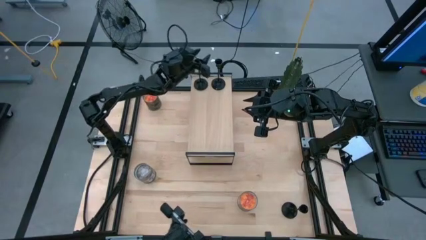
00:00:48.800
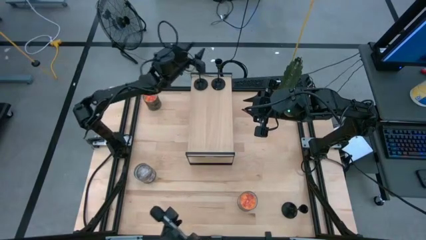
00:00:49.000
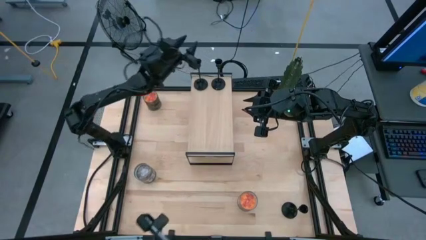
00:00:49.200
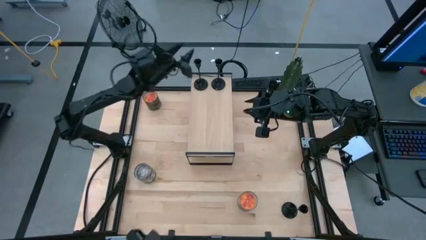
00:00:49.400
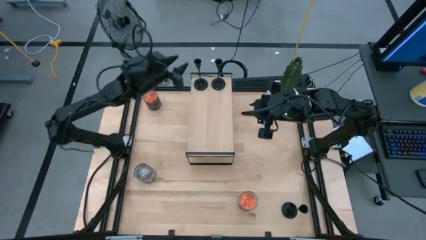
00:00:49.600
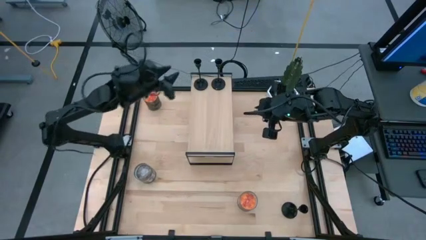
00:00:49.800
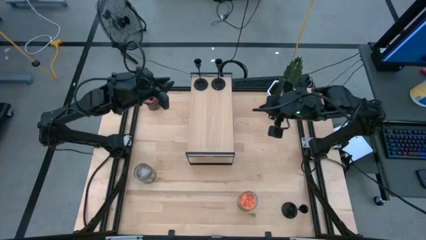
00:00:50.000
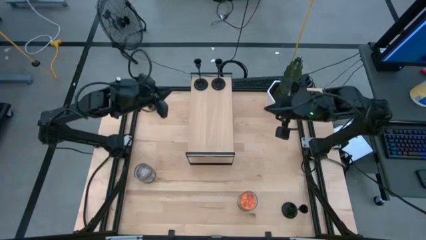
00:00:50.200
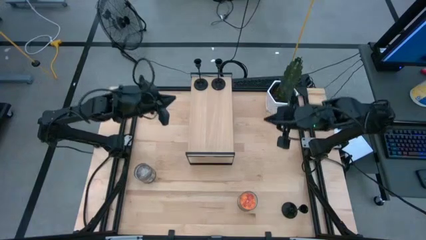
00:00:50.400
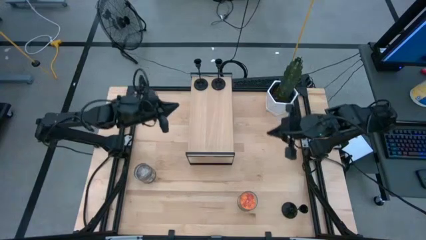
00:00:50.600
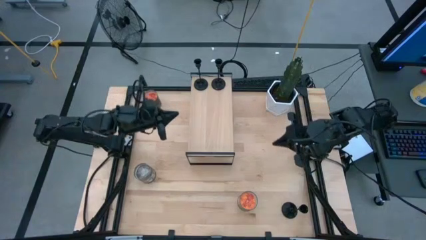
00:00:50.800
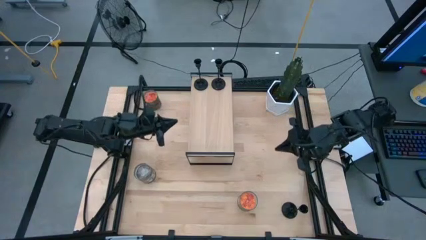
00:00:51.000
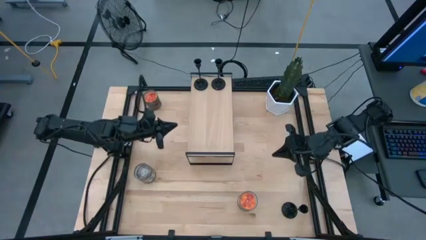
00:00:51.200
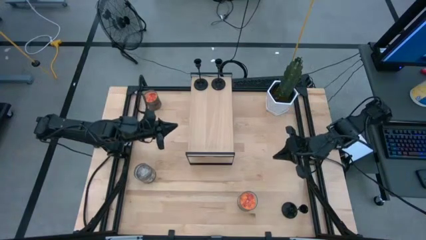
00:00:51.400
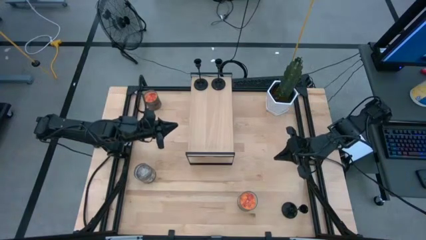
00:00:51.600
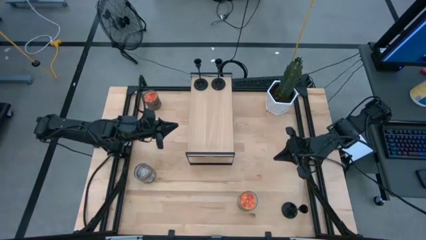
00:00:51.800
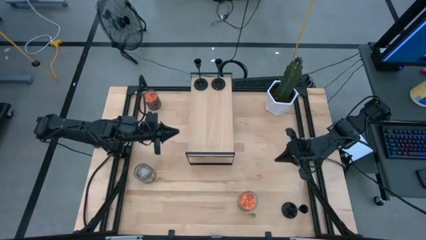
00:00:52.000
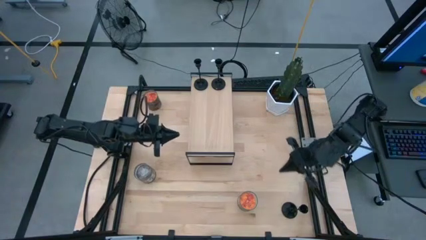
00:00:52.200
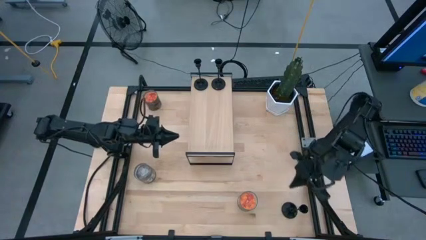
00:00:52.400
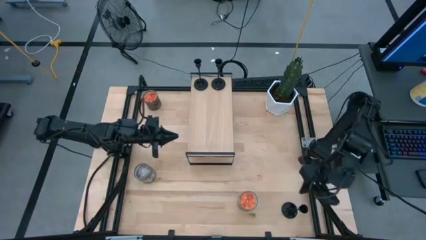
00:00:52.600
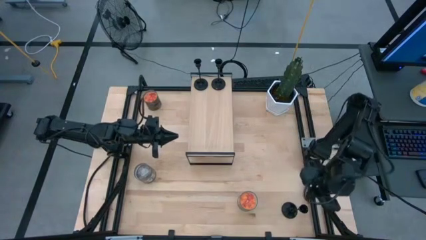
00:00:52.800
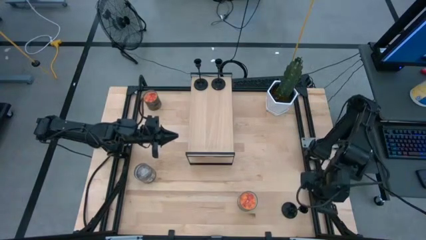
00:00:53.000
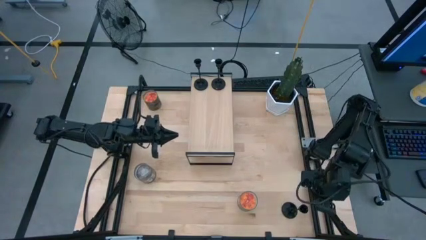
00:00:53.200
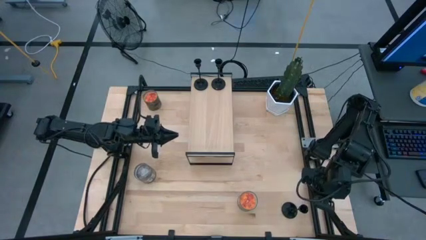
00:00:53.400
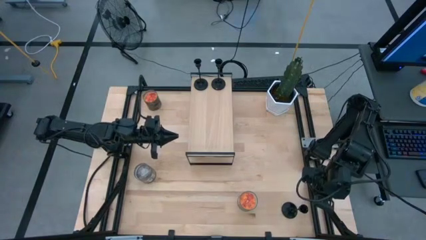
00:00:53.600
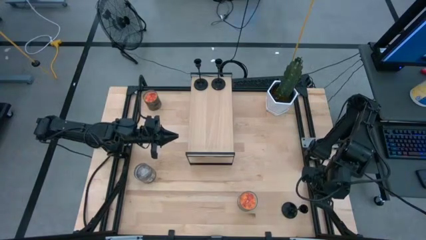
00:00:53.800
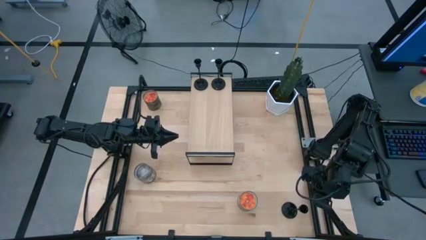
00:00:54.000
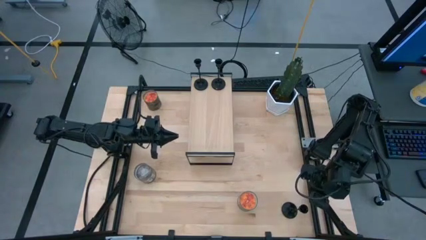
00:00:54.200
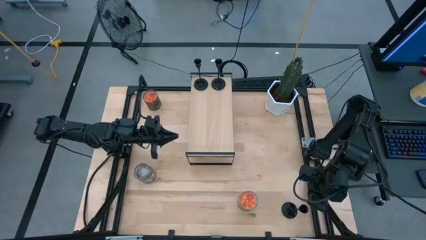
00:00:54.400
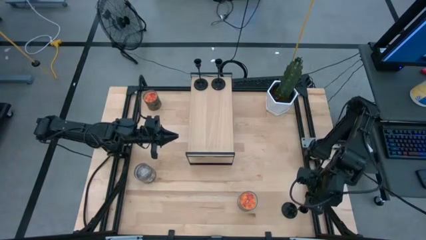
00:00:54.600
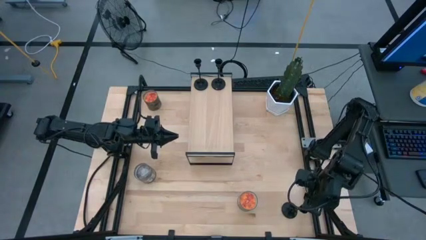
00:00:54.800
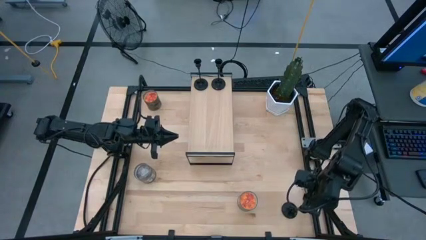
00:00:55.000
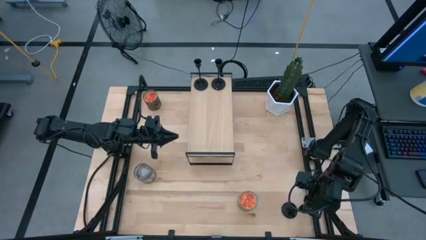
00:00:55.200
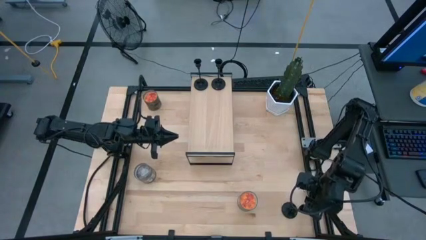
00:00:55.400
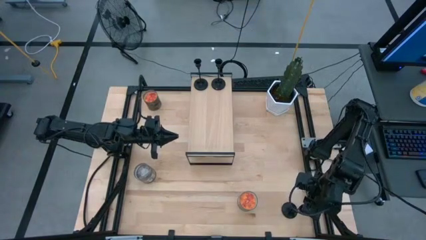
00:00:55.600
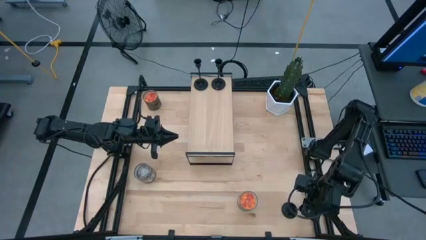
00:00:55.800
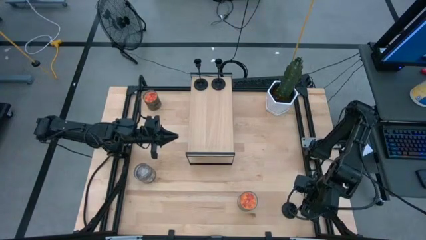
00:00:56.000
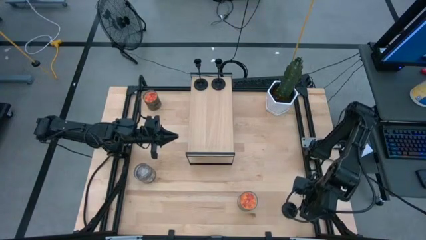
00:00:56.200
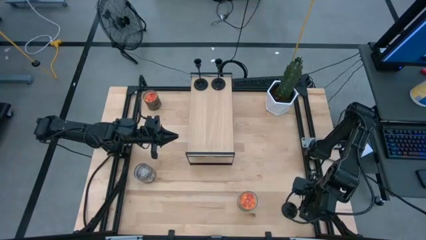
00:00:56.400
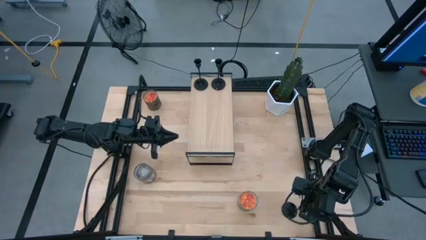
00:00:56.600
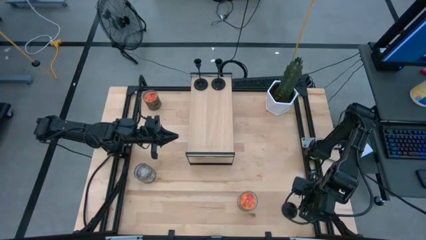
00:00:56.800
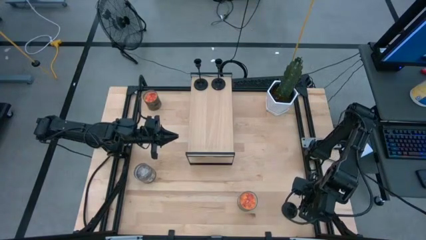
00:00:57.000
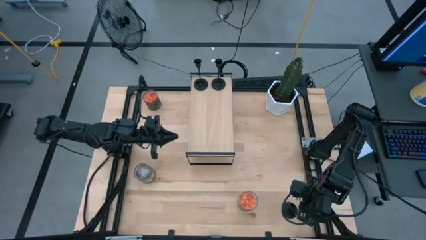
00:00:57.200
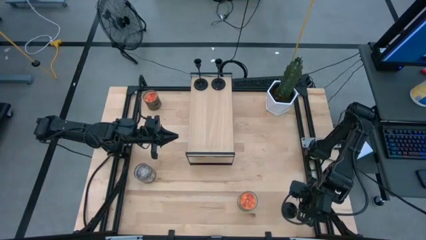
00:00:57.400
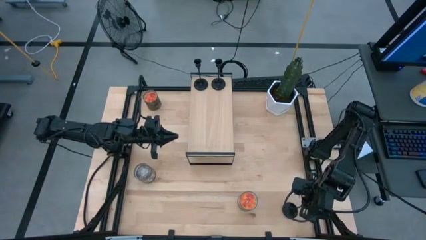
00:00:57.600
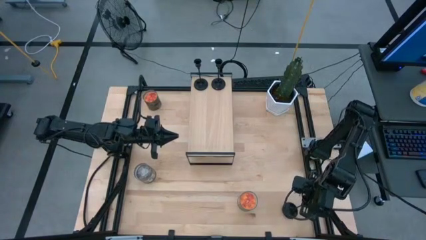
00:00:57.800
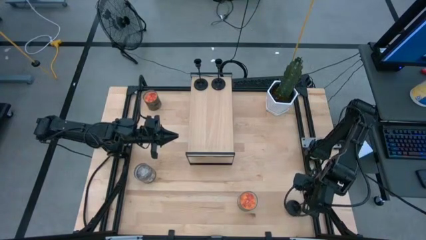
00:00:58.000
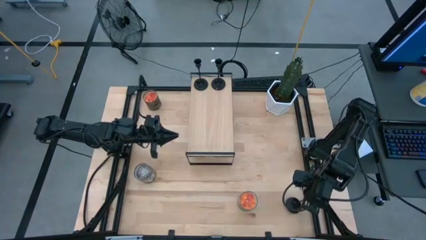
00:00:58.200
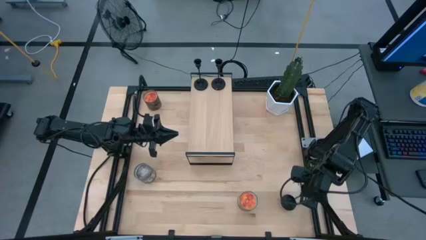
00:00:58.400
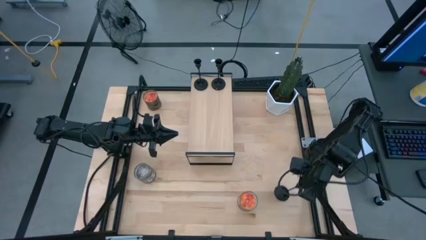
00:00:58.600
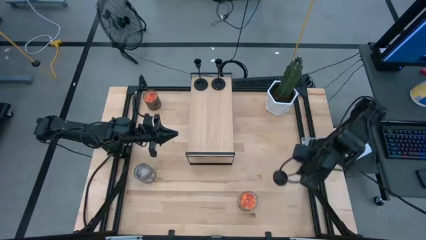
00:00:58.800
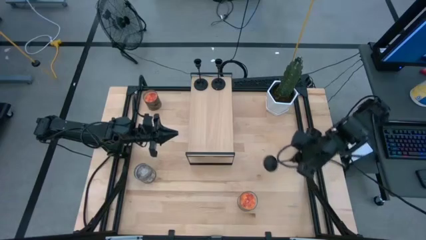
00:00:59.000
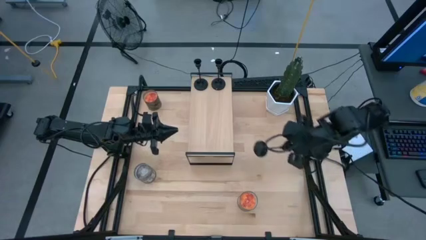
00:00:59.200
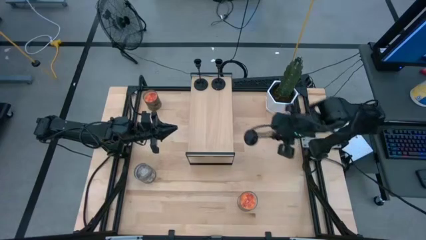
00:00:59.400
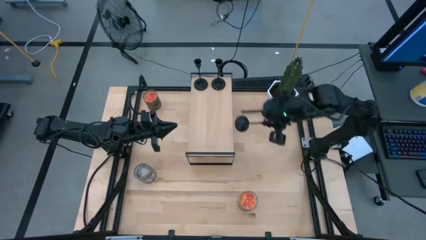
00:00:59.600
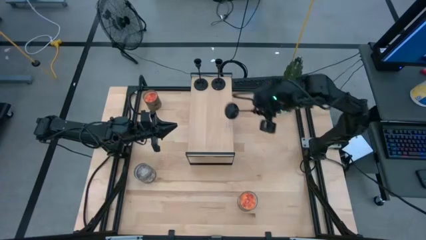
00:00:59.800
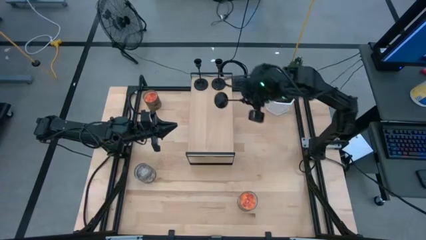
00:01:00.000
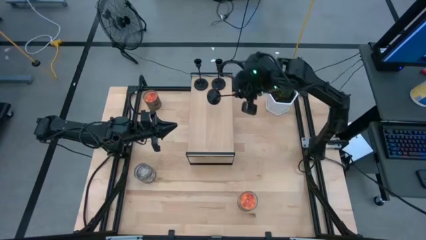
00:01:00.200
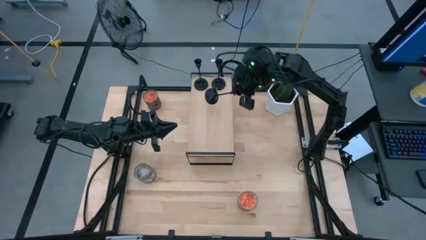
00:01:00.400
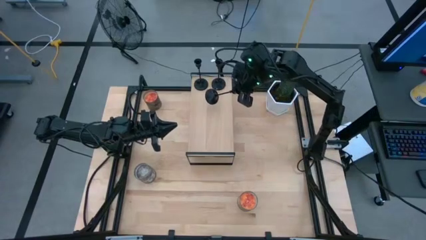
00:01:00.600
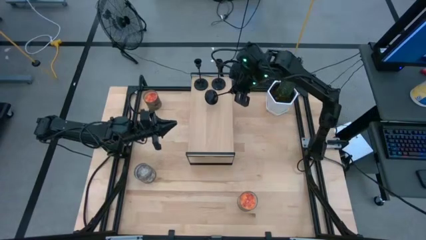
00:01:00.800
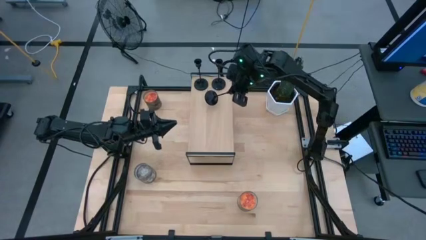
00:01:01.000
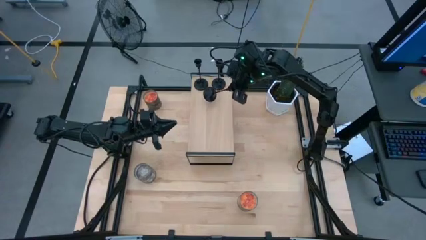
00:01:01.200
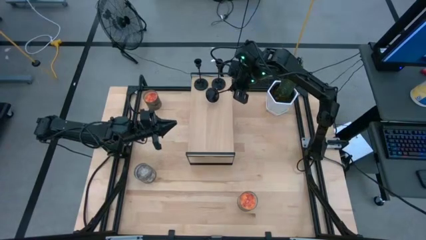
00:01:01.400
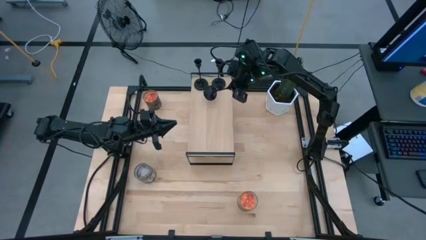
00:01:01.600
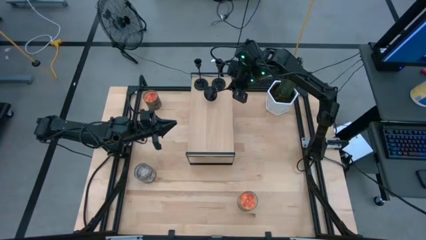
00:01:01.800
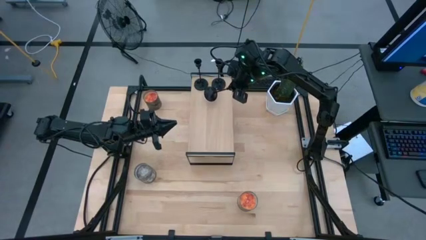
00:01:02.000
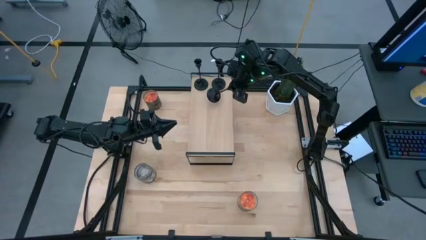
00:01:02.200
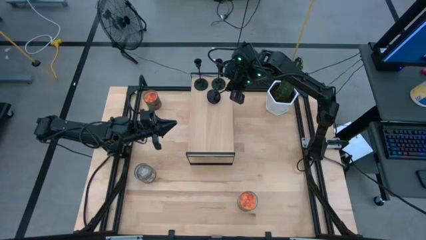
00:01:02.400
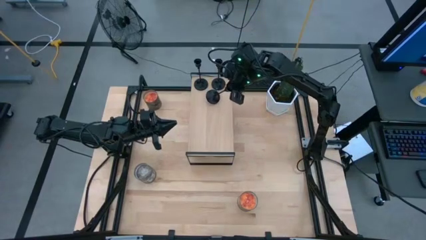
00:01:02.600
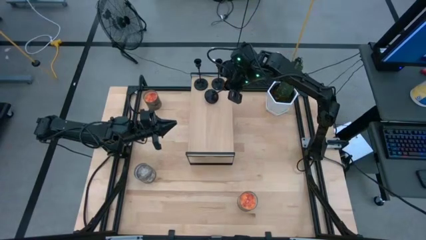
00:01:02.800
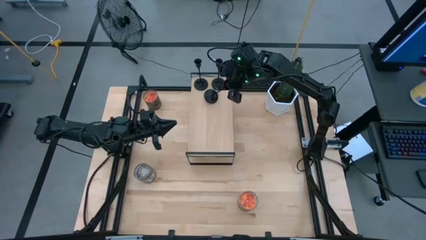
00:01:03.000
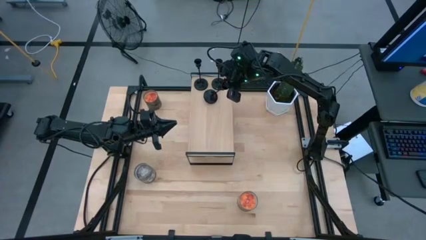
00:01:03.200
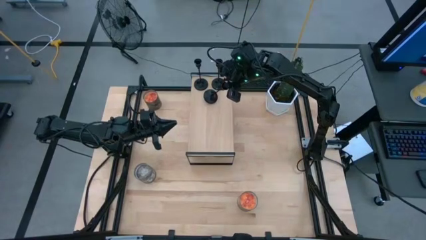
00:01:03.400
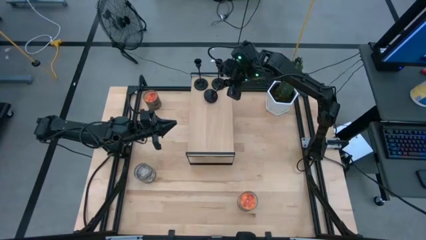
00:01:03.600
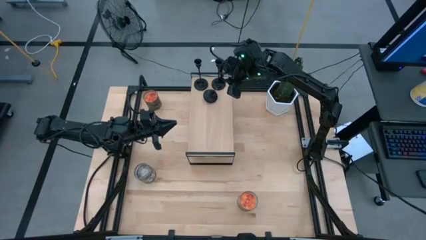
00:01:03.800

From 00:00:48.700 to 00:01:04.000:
Task: Pick & Place candle stick holders
Put the black candle holder on the shelf

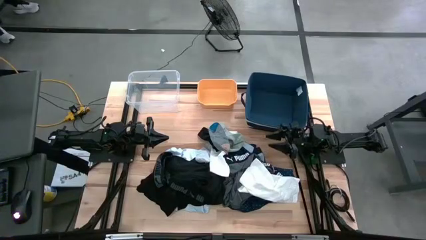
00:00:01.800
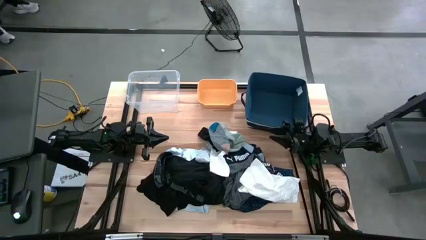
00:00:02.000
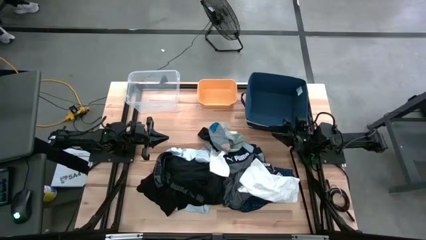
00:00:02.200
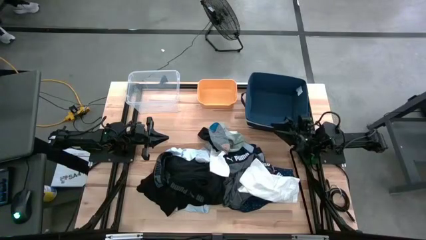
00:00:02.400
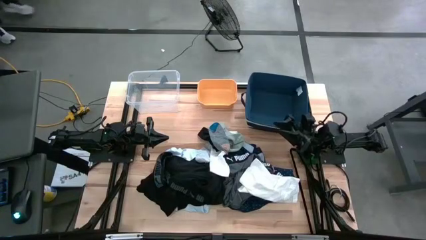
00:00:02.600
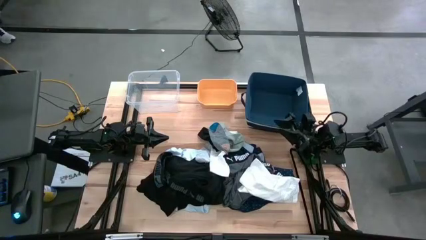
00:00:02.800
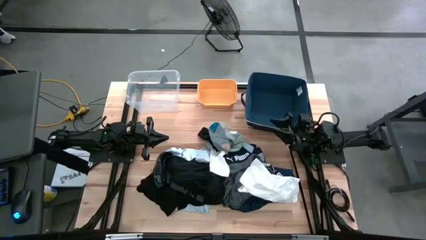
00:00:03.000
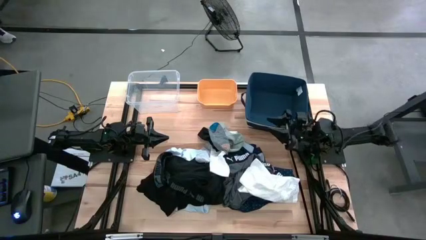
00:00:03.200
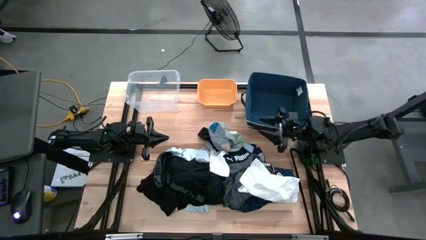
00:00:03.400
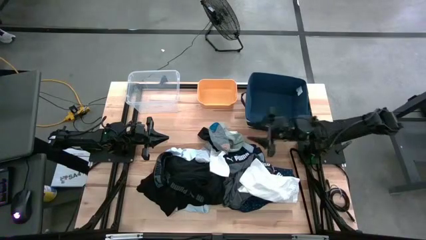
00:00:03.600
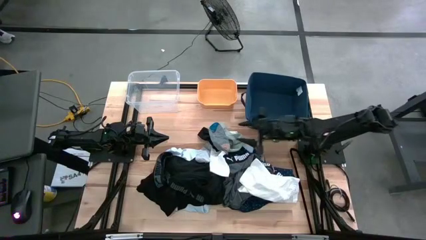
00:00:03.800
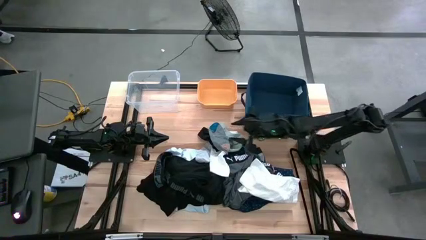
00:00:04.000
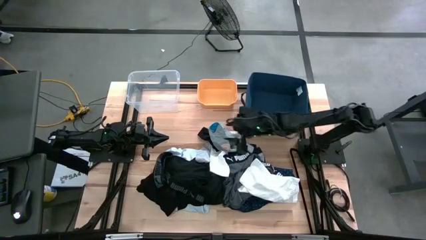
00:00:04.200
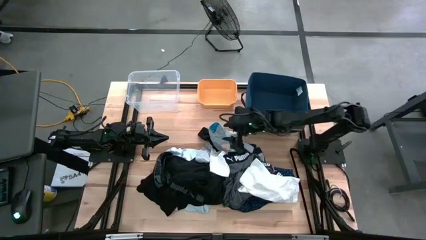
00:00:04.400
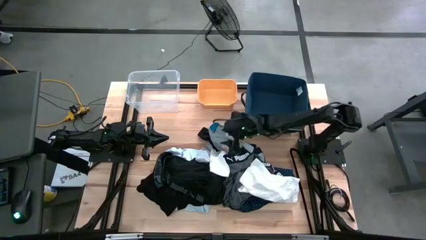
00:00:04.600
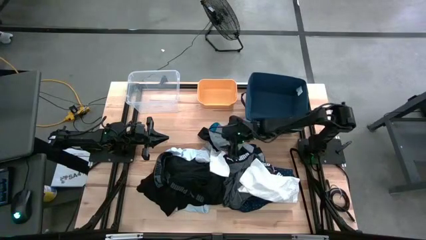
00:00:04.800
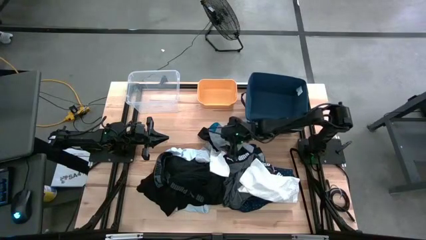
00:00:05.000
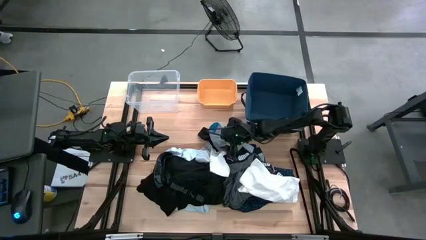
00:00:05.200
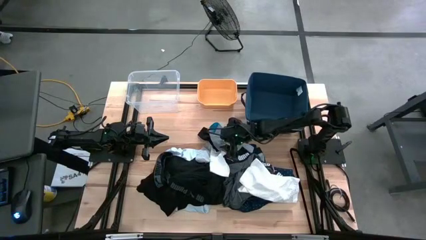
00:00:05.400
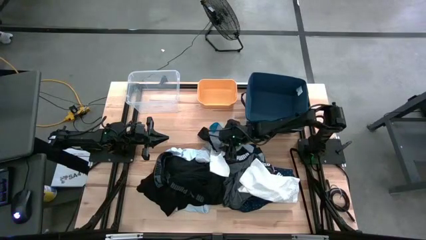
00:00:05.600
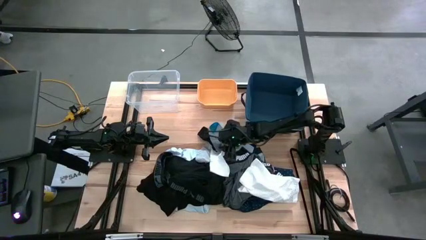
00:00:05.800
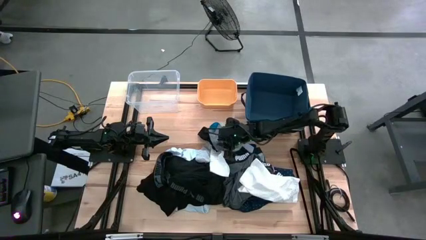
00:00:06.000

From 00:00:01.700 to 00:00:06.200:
Task: Pick & Place Cloths
Put the gray sock into the yellow bin
